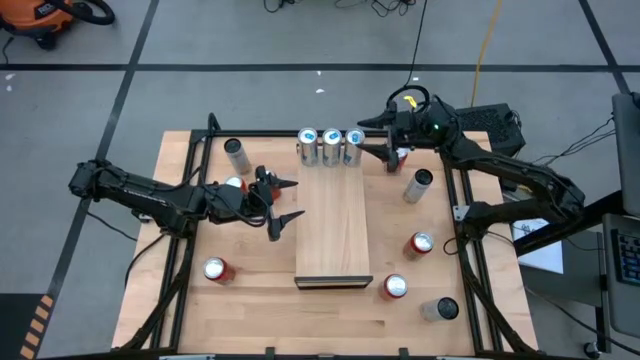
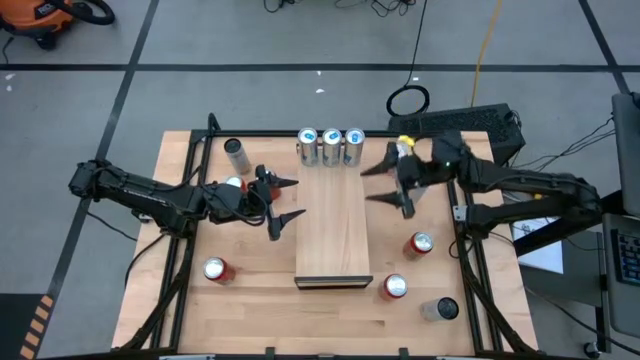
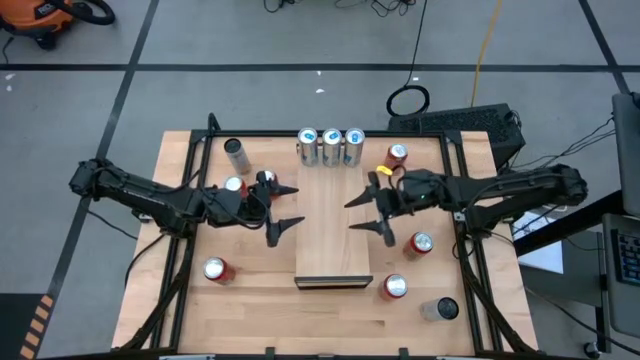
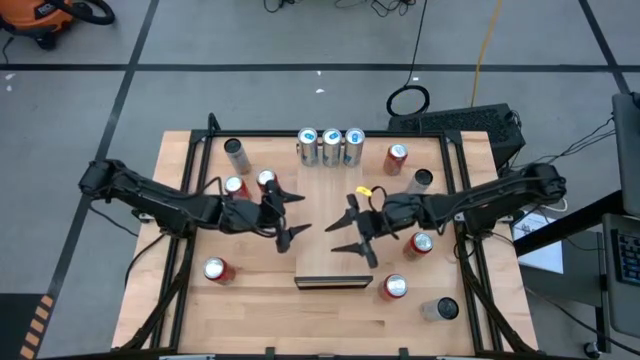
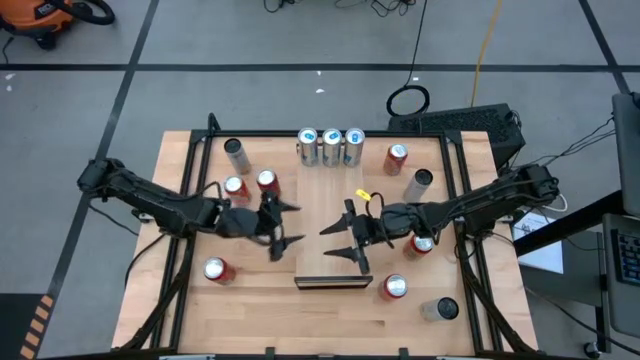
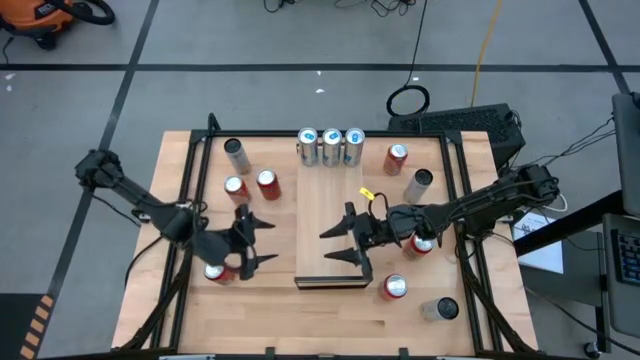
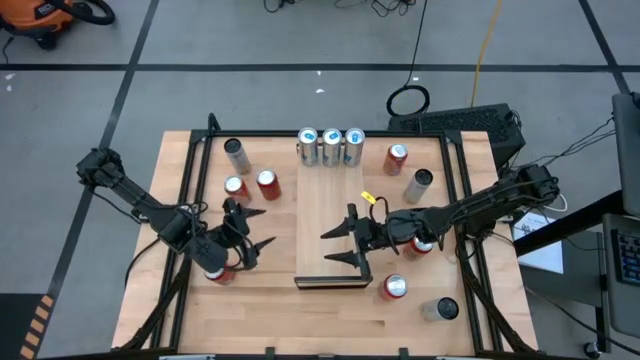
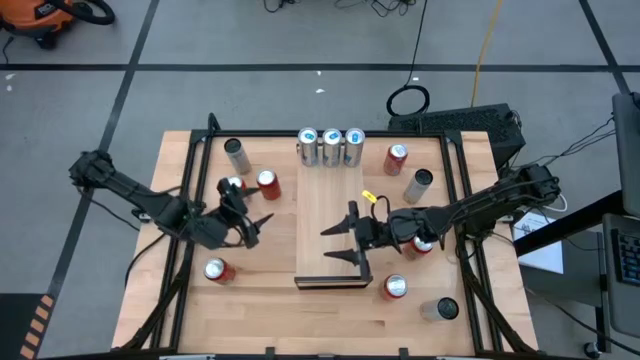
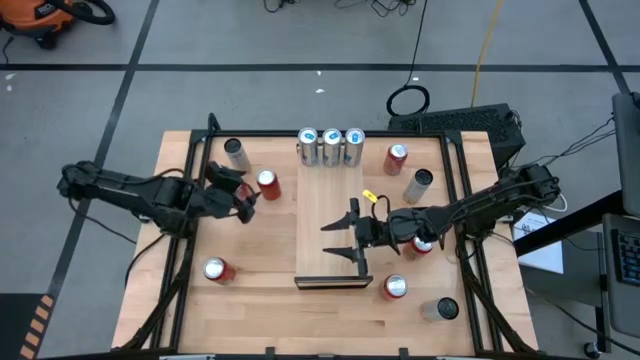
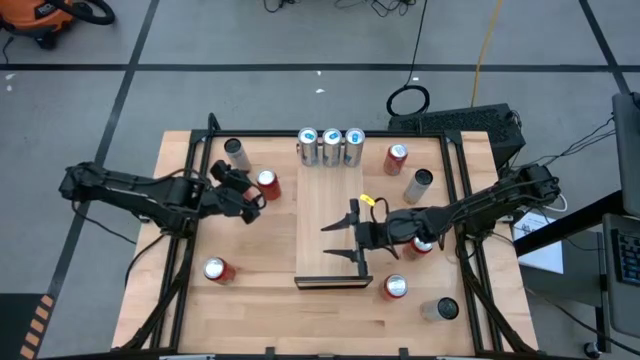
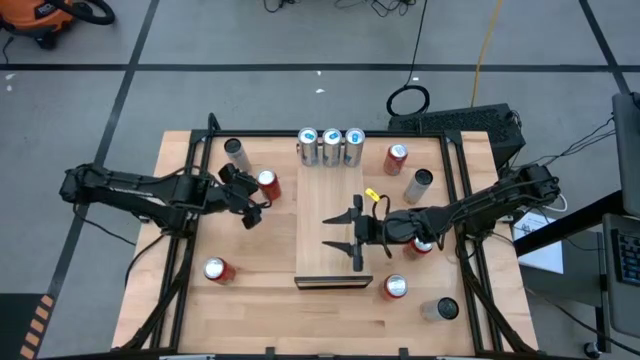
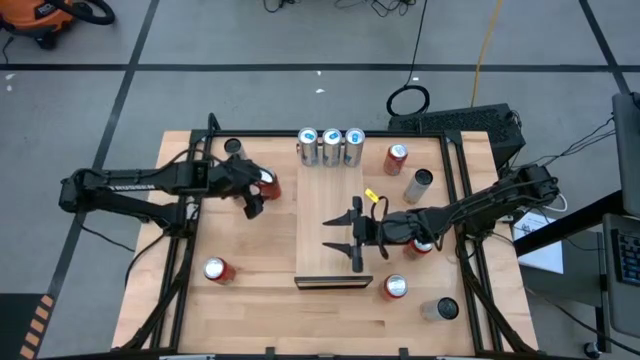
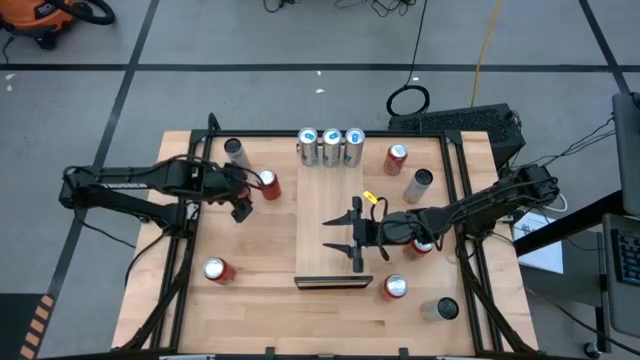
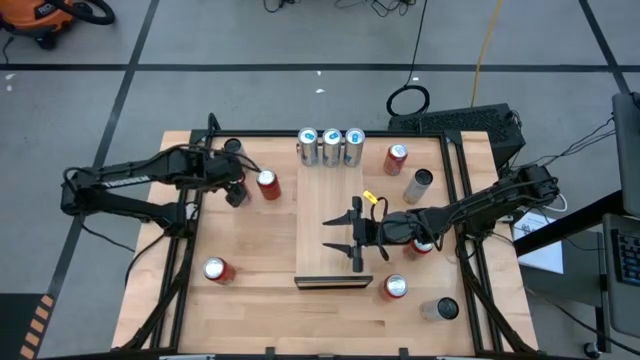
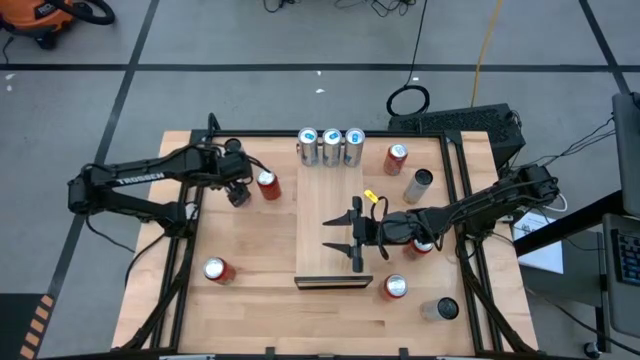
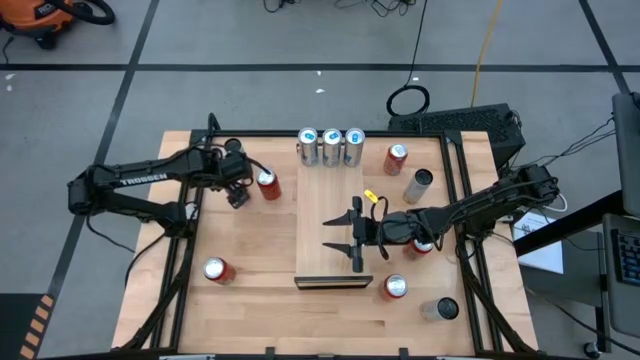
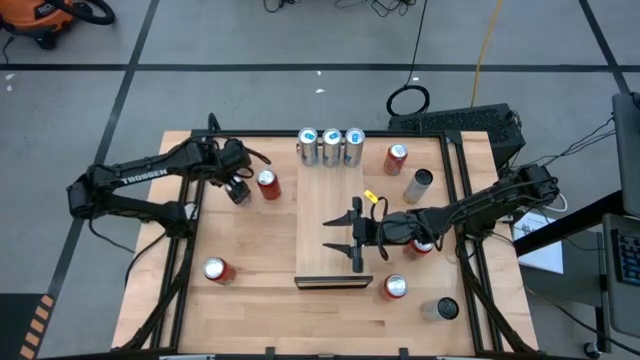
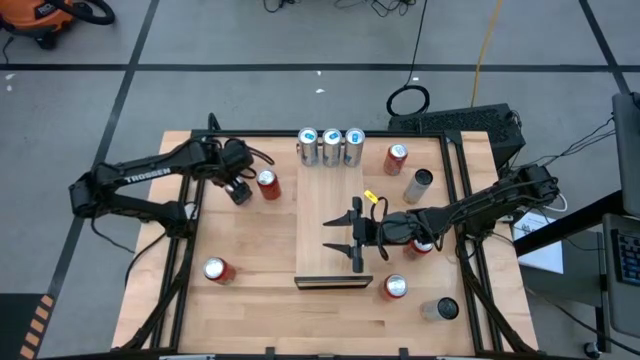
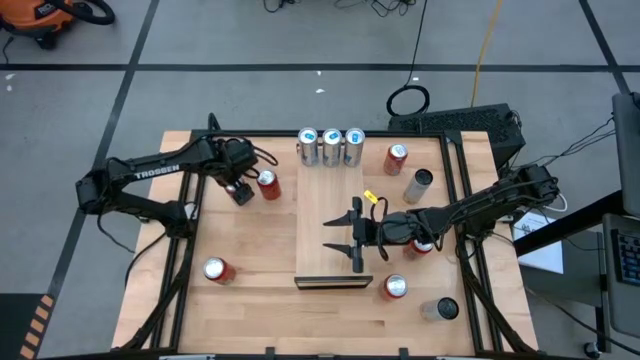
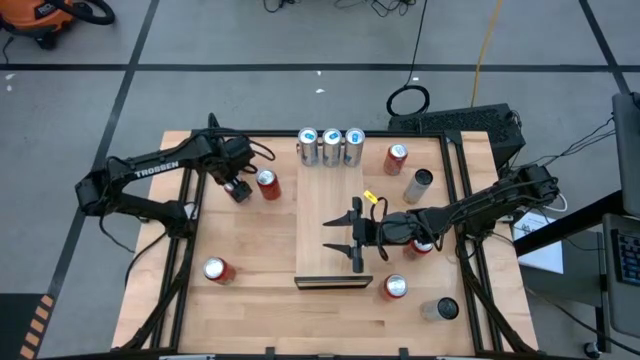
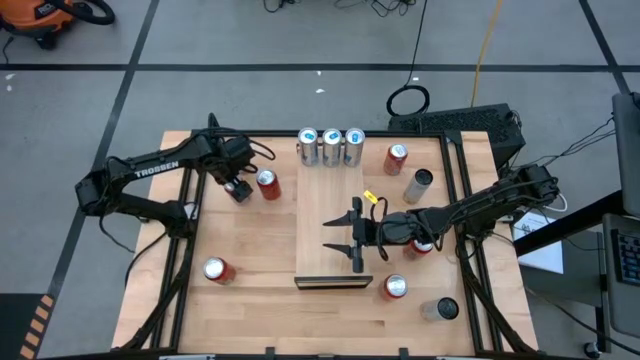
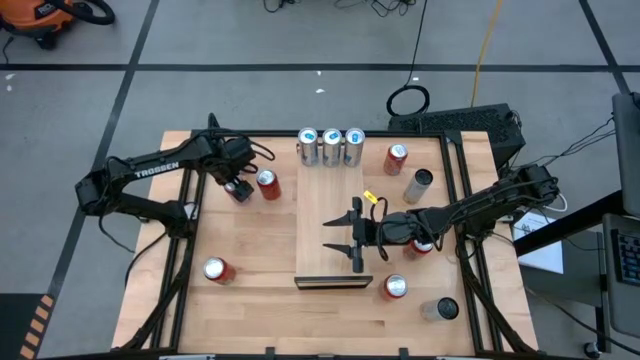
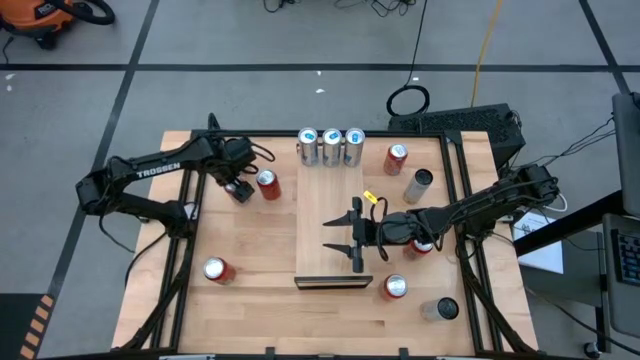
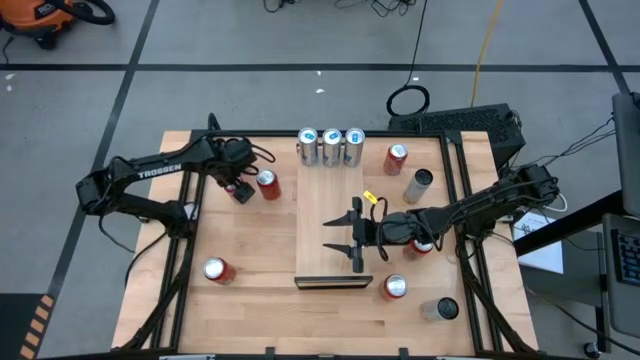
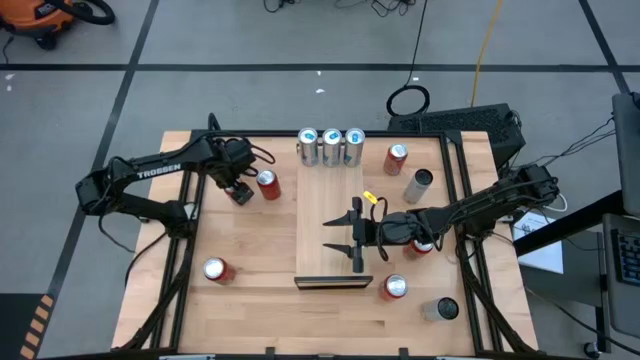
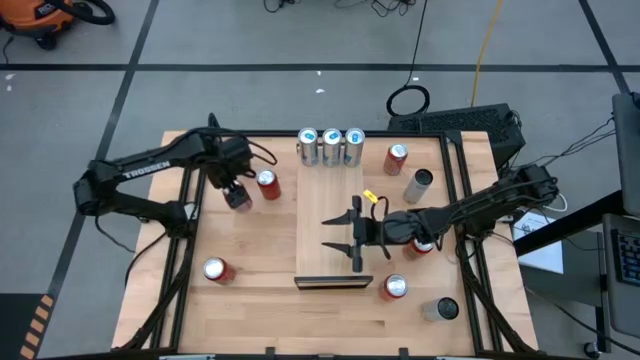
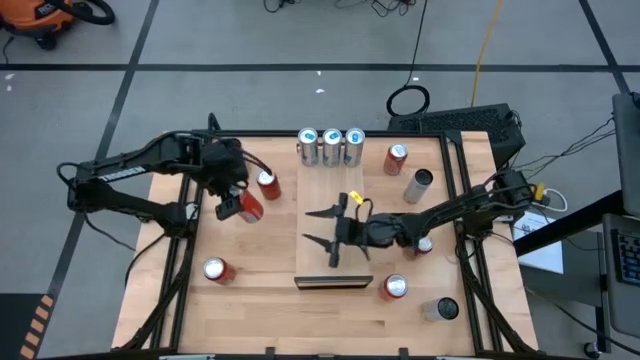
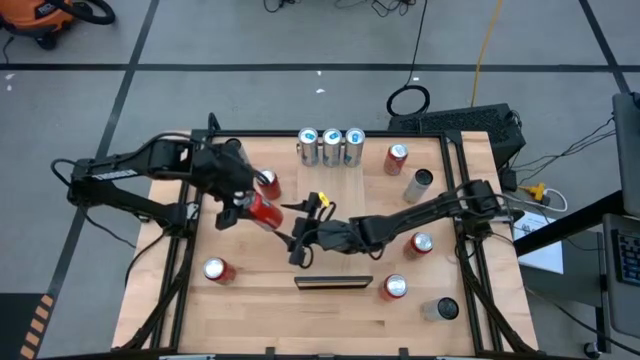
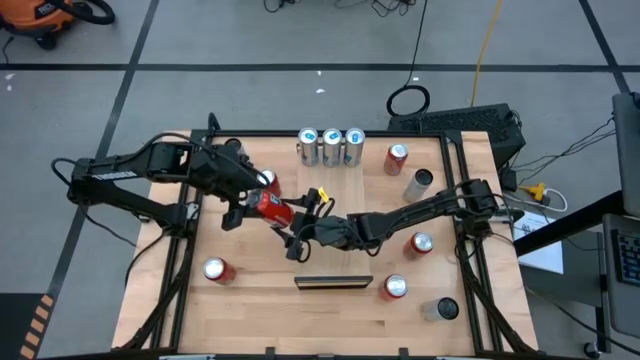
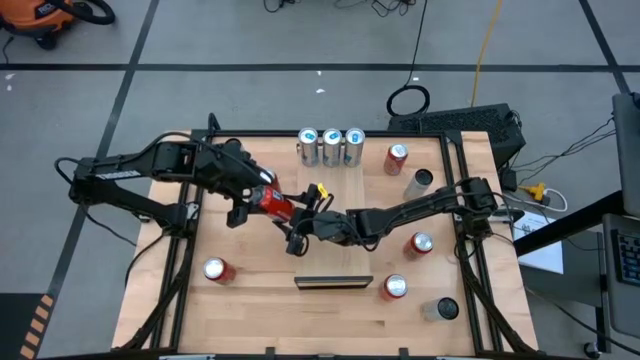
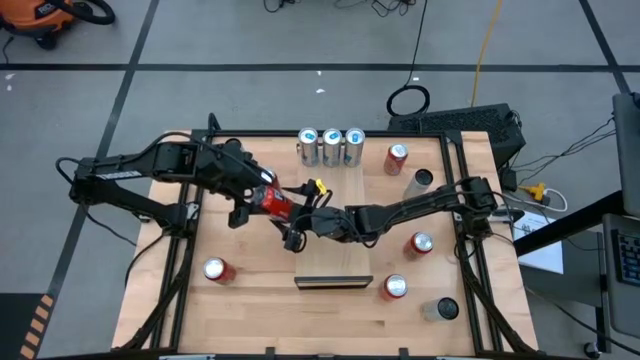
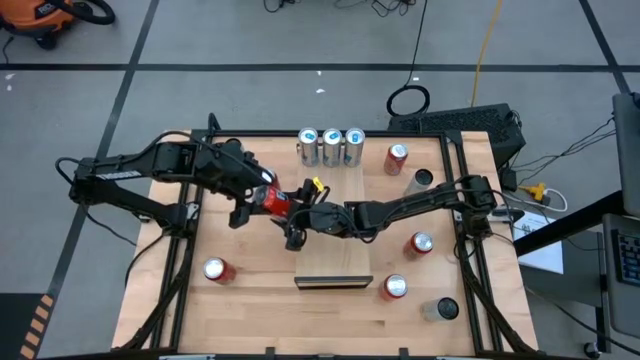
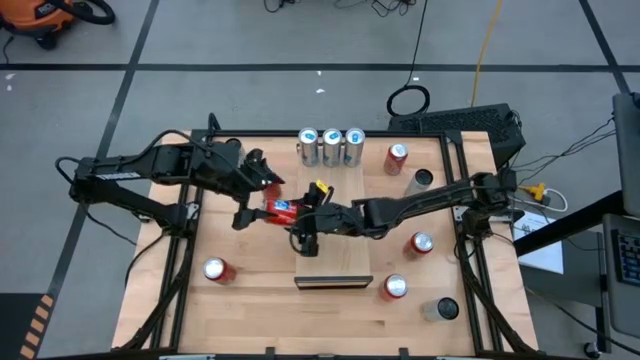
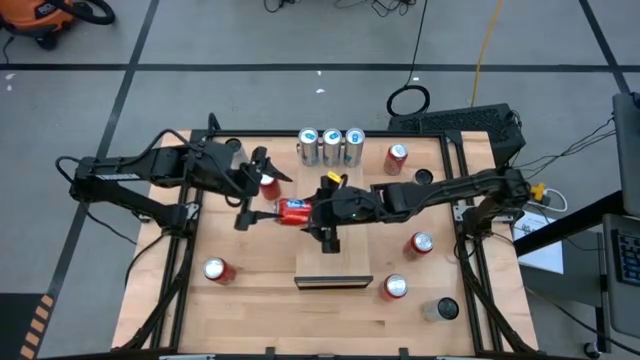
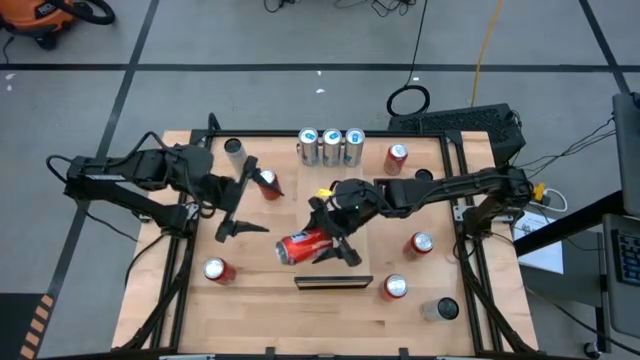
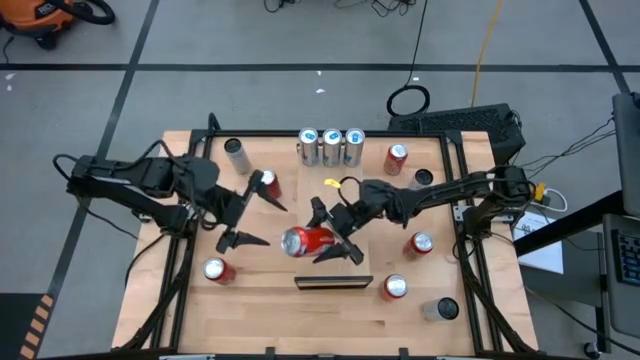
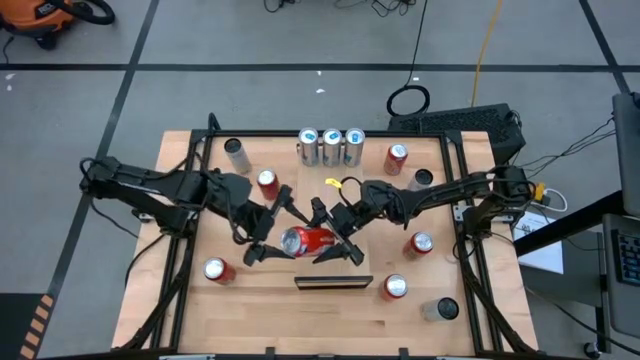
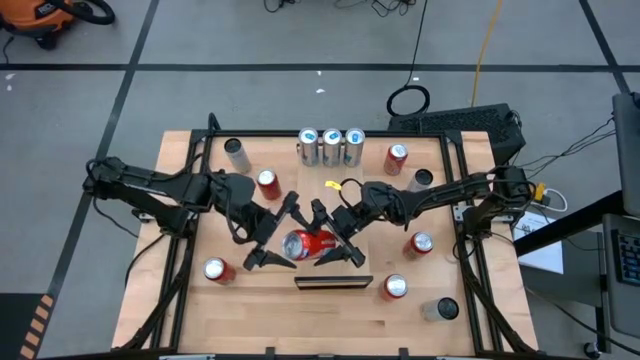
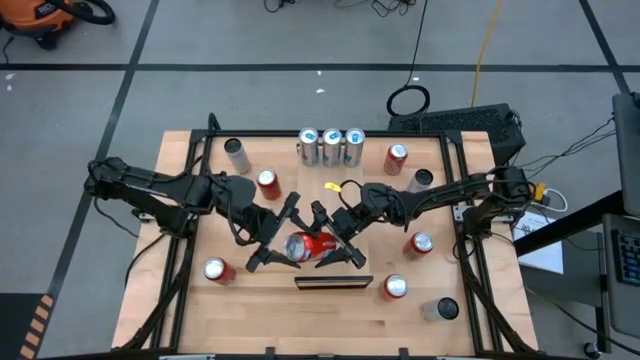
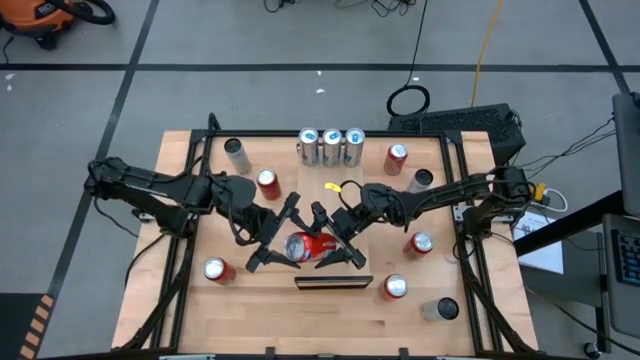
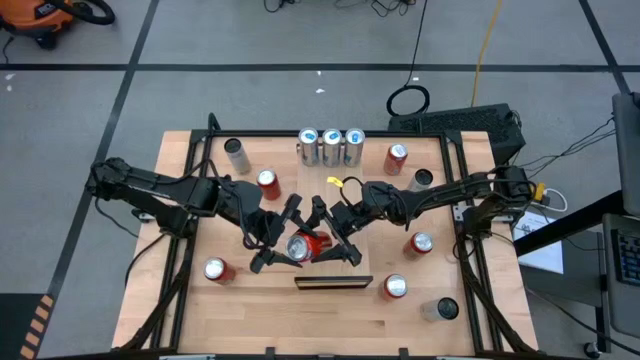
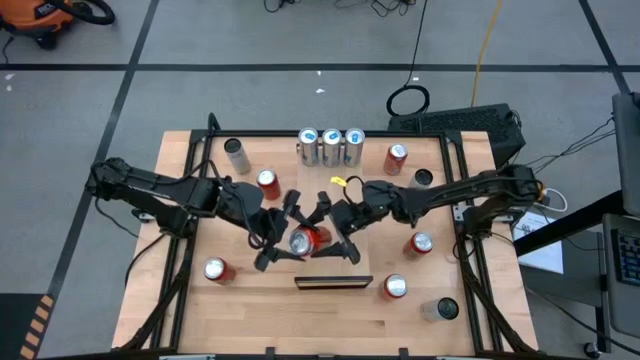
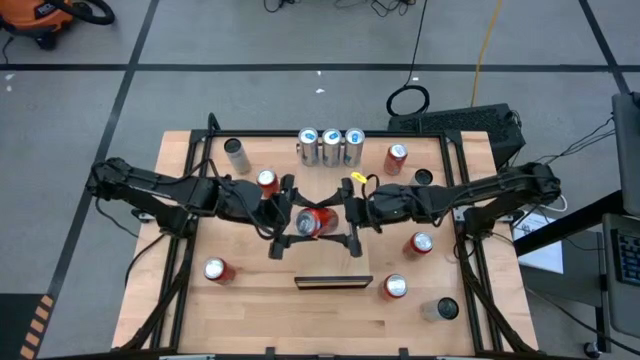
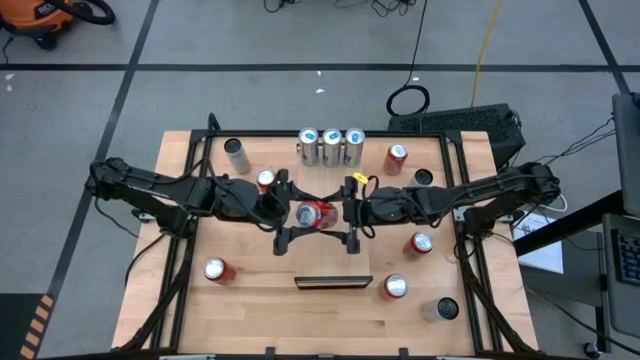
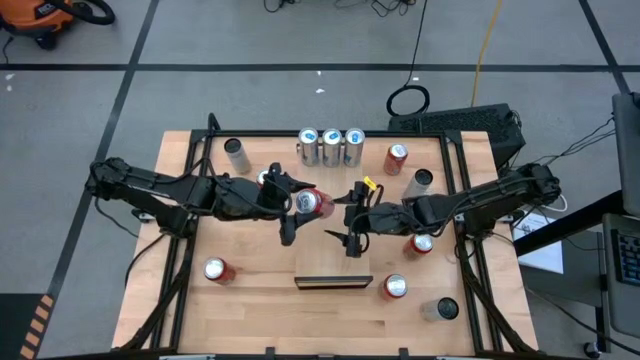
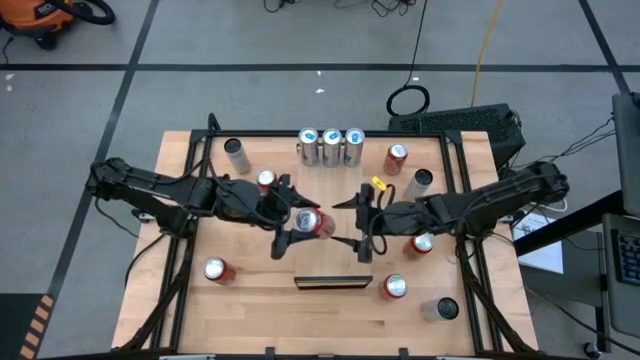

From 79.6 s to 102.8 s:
Task: Place canned beverage on shelf
Put the middle red soda can on the shelf
